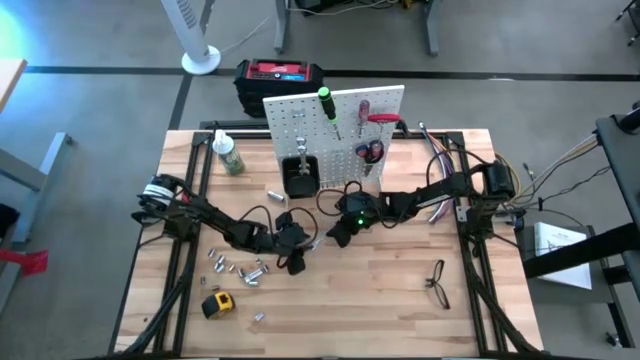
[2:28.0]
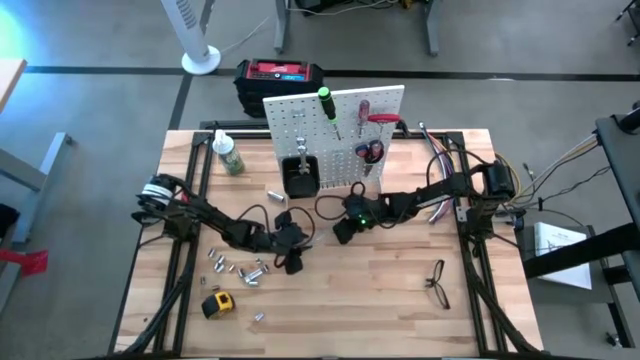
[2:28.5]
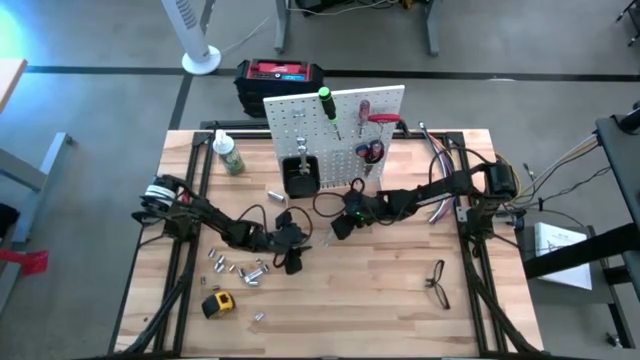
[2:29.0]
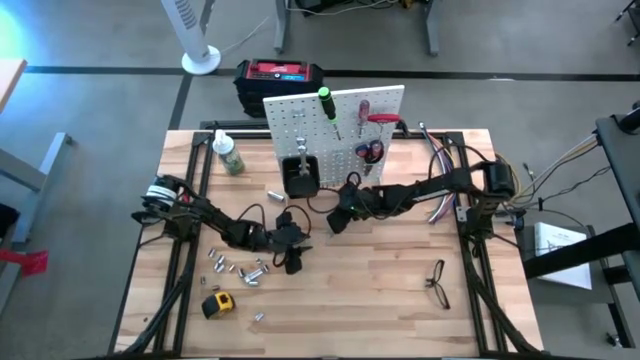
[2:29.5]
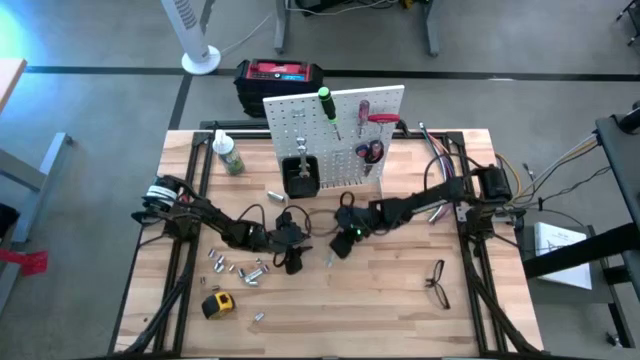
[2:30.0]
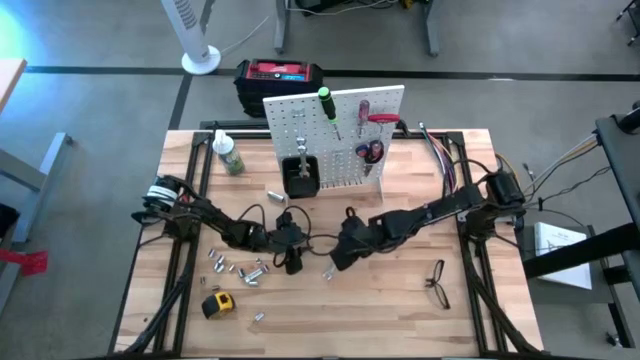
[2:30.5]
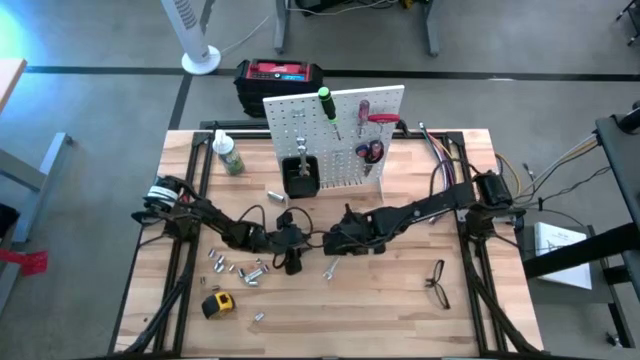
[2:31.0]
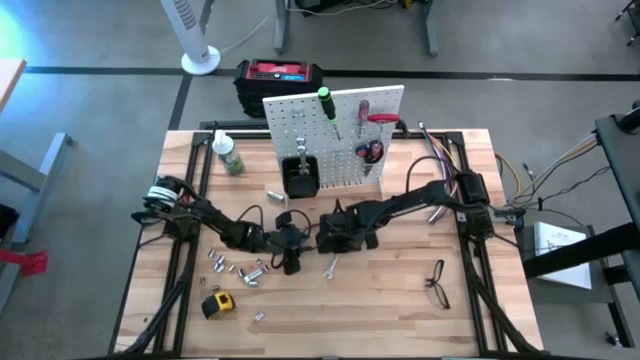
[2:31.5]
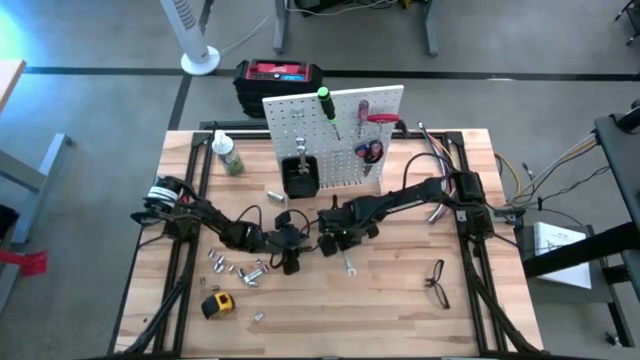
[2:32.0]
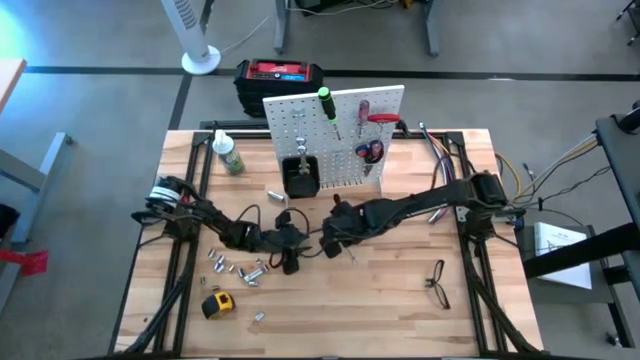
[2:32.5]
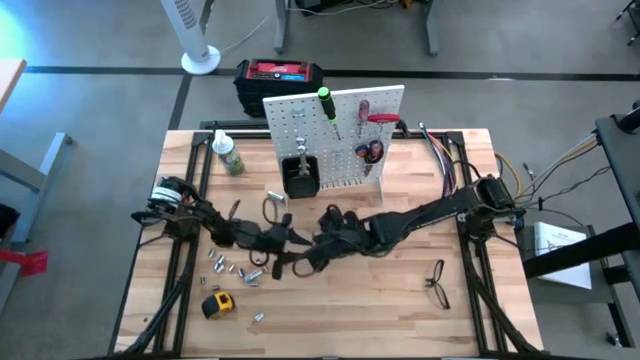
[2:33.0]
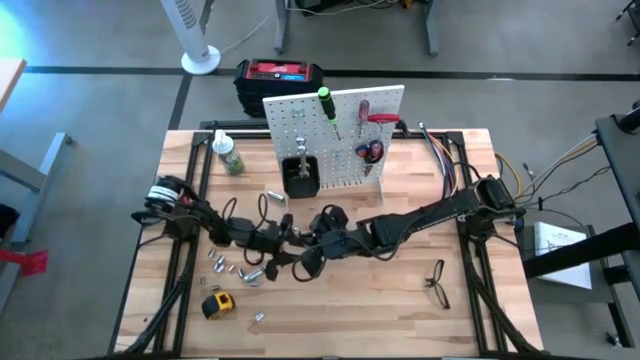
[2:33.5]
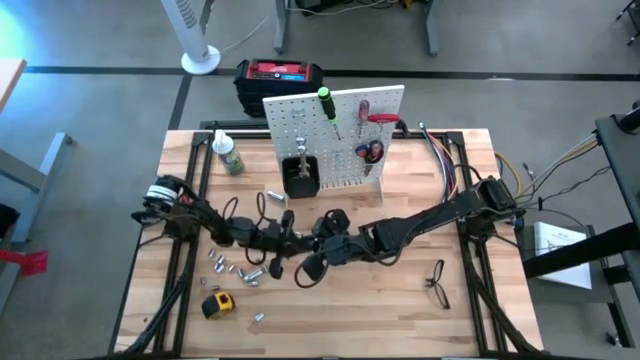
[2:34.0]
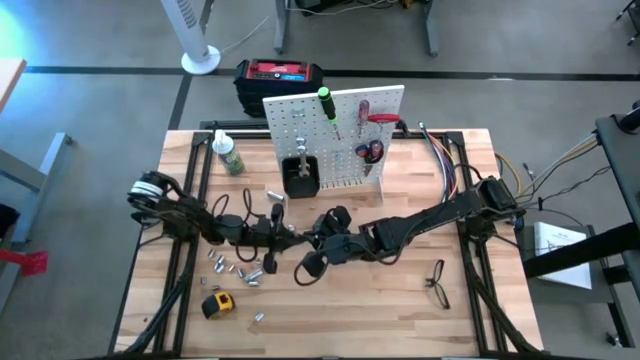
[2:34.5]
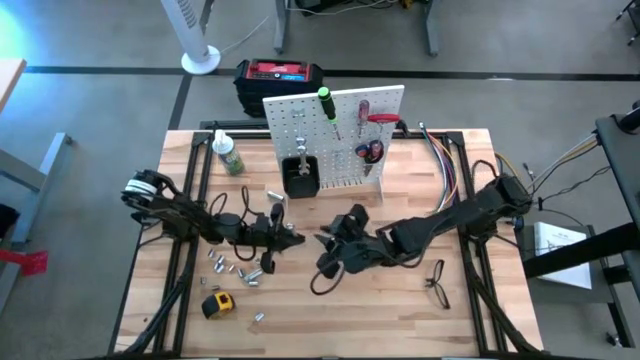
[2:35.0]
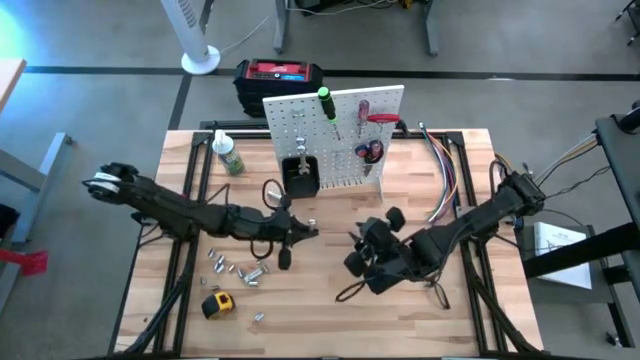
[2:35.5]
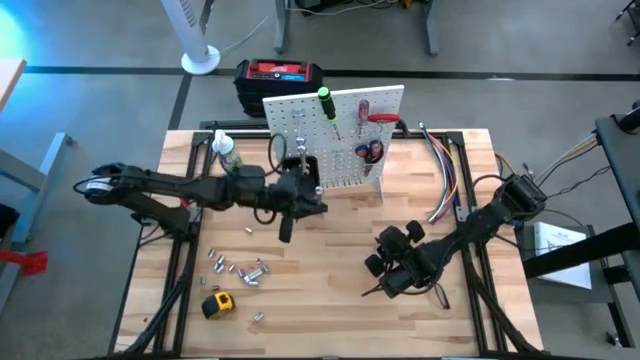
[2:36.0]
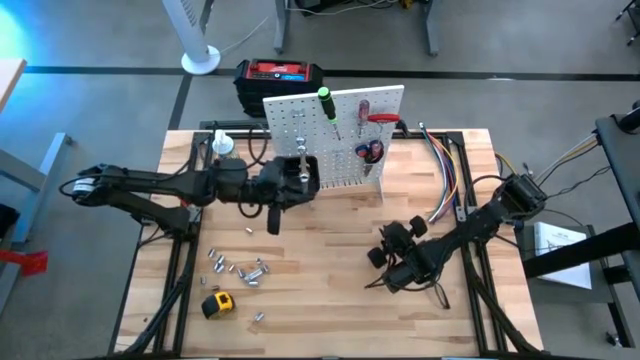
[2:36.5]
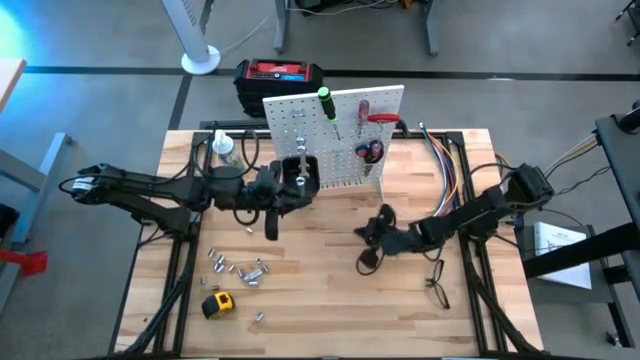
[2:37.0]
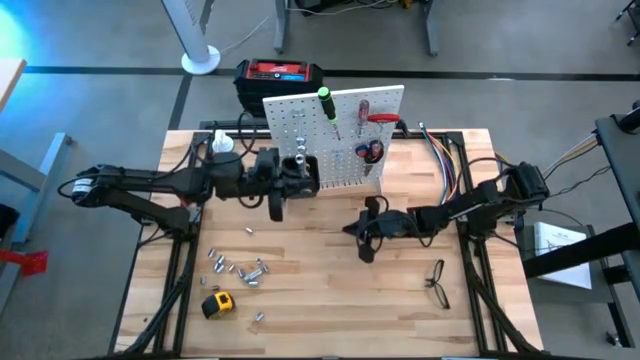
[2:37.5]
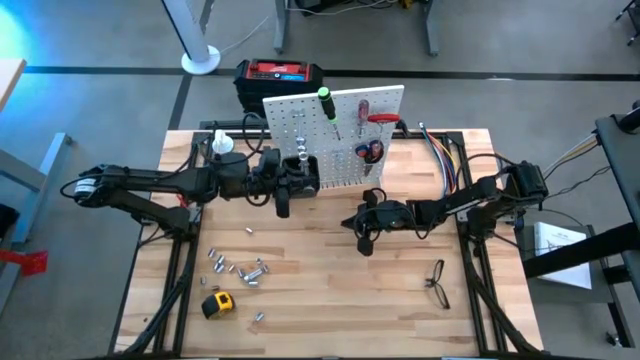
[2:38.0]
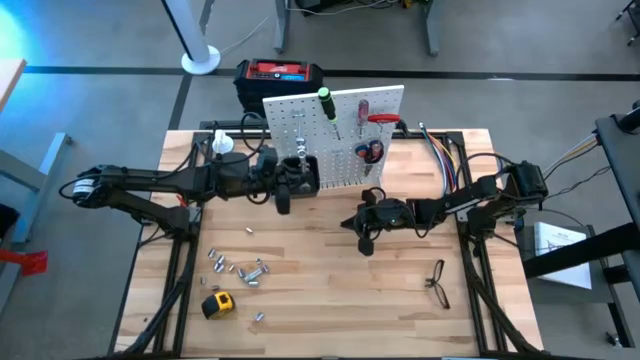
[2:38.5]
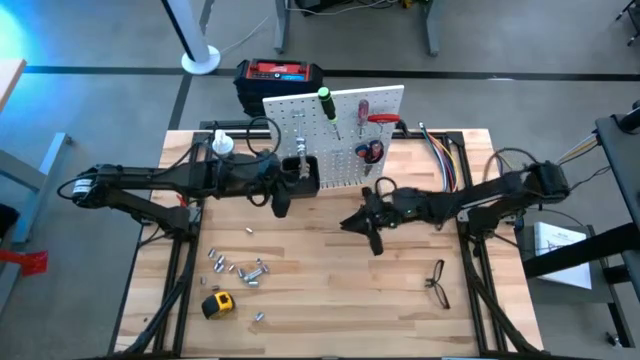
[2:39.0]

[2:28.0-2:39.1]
Task: Hang tools onto peg board
Hang the silver wrench on the pegboard

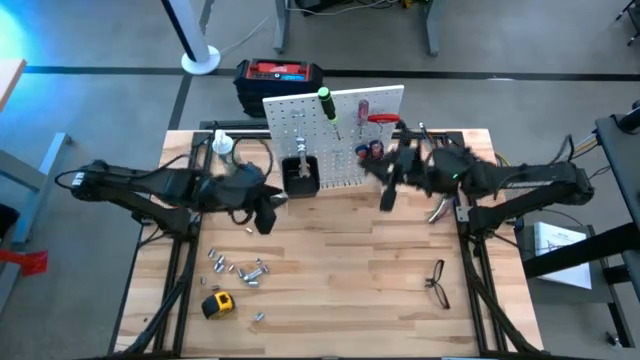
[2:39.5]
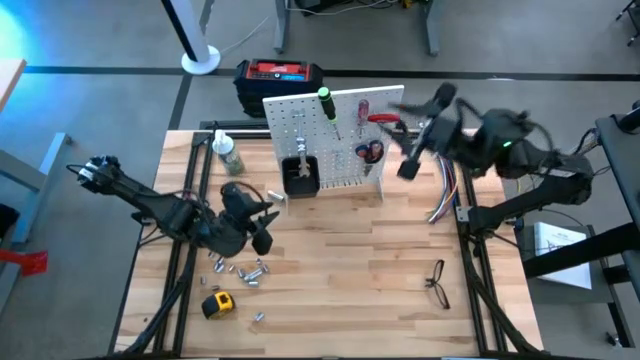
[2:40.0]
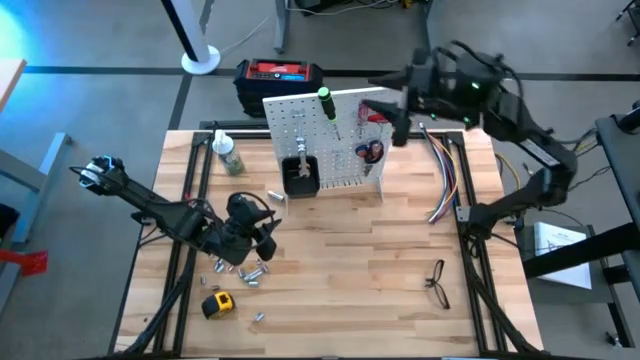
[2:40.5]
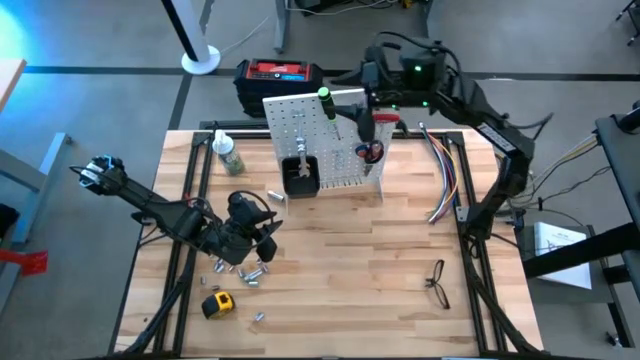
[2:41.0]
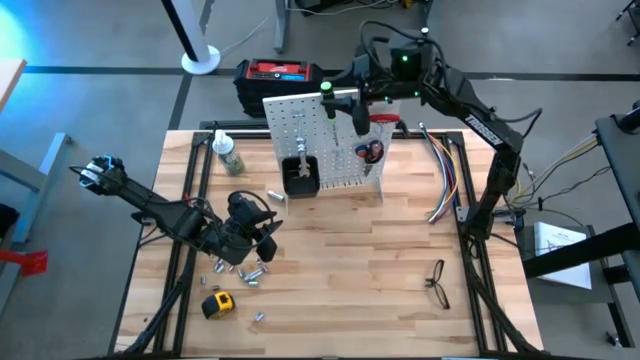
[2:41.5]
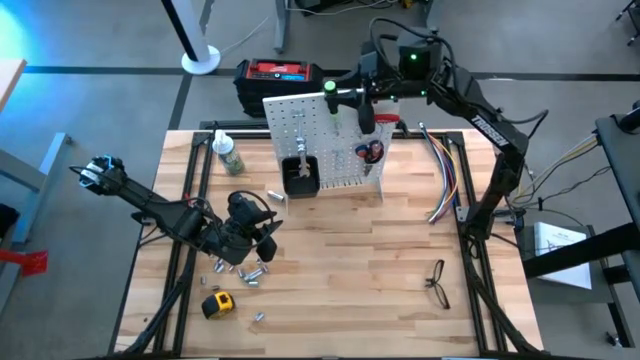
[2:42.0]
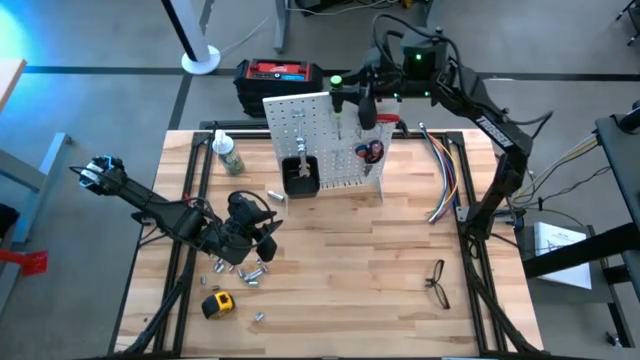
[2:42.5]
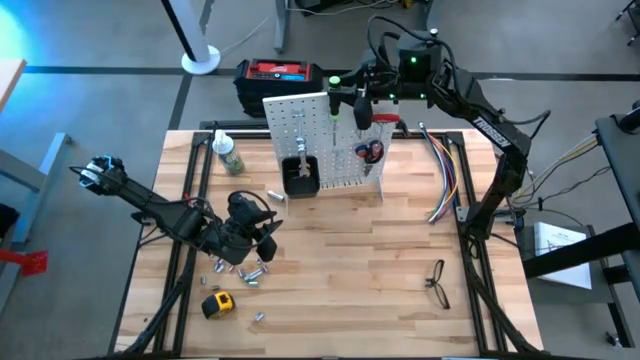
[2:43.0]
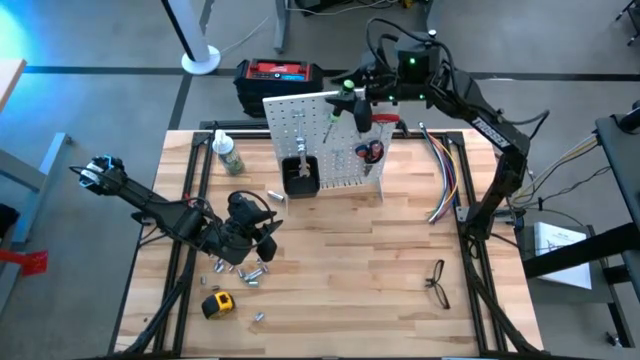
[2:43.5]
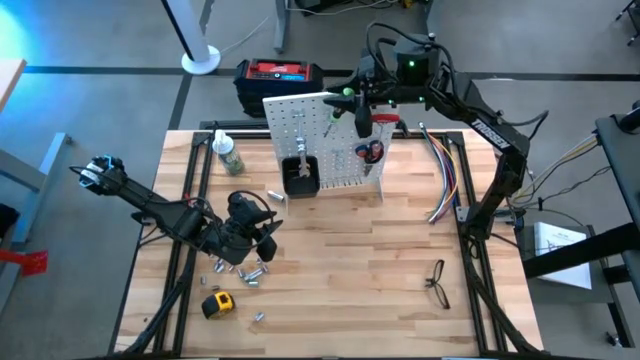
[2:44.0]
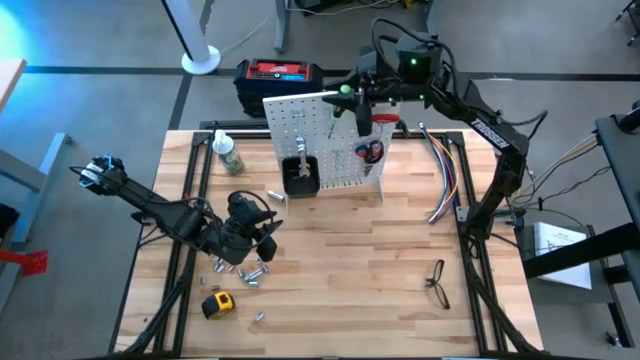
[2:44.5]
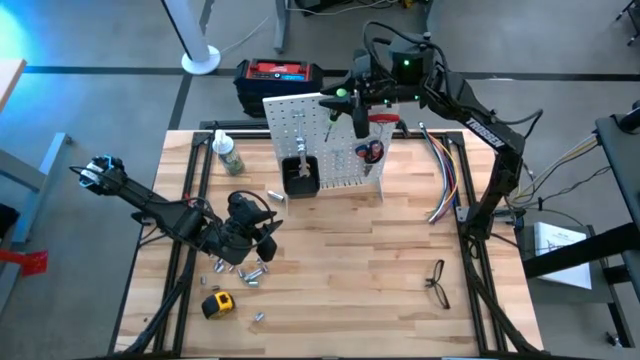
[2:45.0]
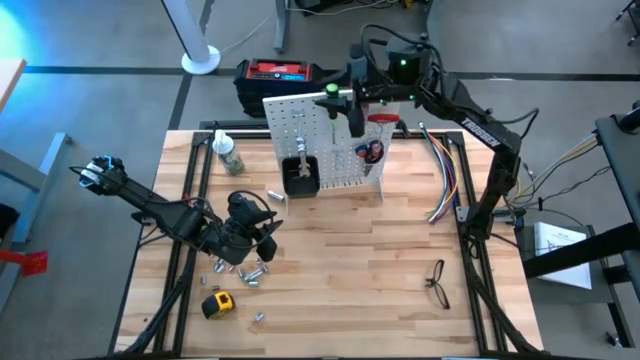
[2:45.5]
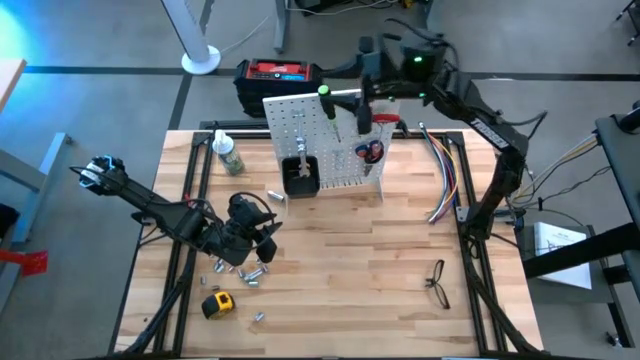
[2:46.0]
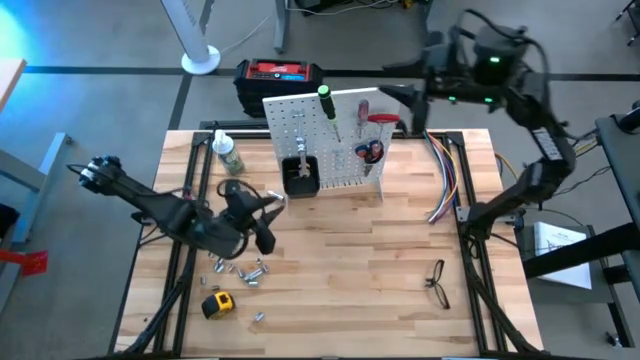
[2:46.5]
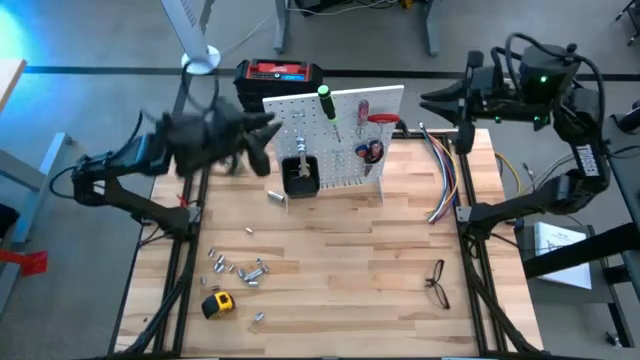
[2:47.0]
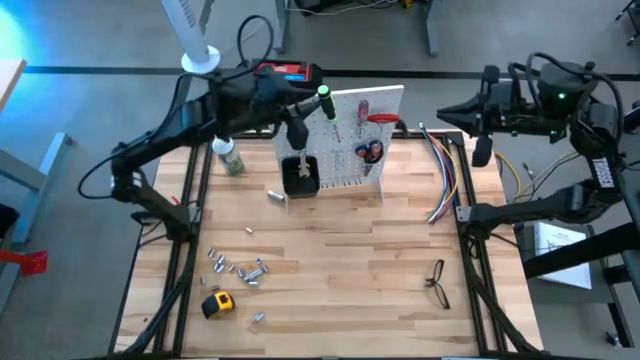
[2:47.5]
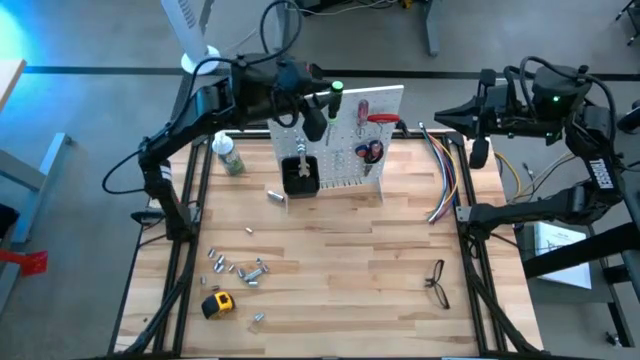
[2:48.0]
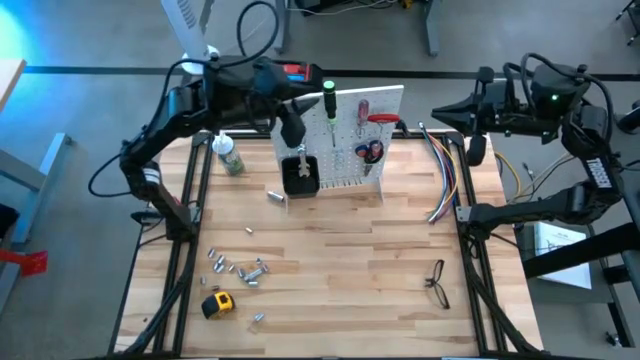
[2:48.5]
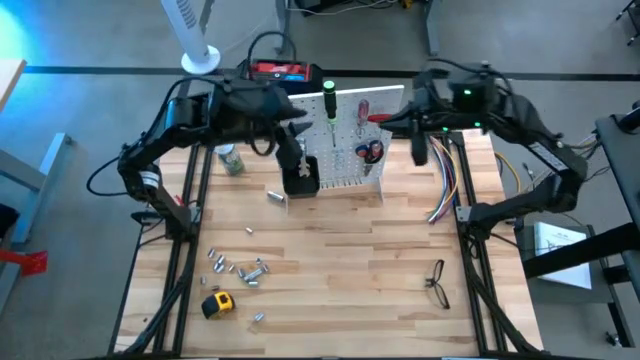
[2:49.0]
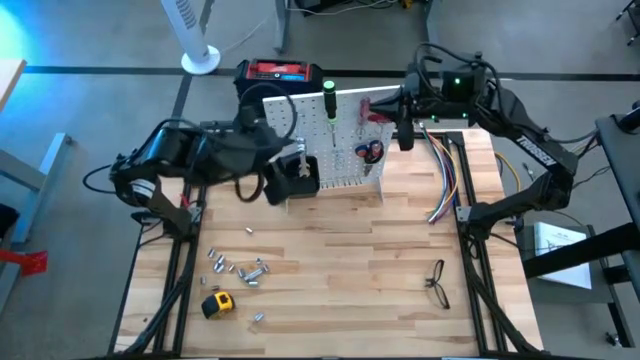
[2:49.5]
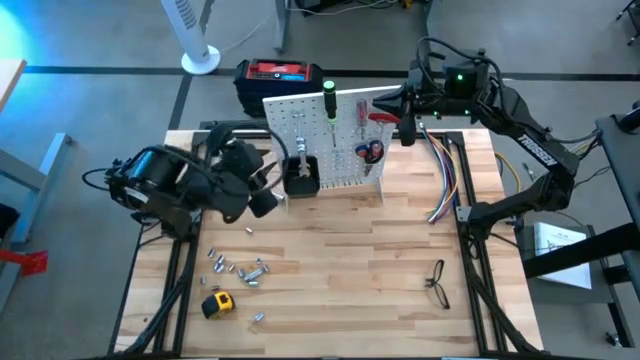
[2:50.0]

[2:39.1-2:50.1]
Adjust the tools on the pegboard
